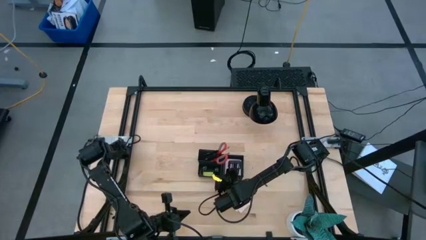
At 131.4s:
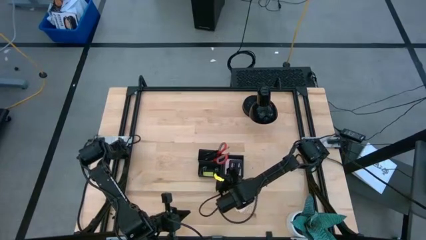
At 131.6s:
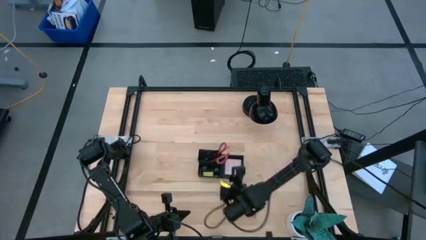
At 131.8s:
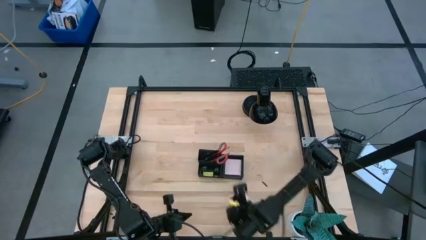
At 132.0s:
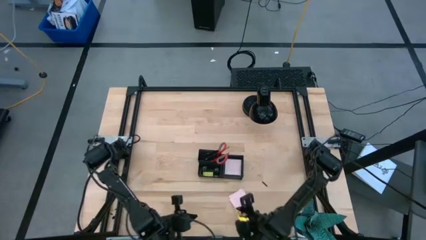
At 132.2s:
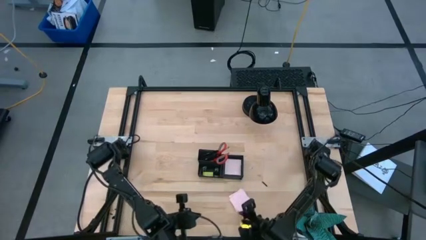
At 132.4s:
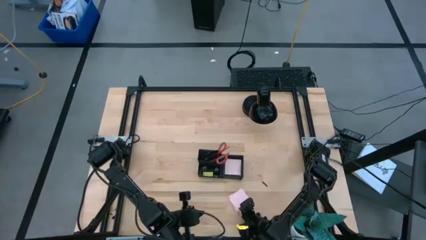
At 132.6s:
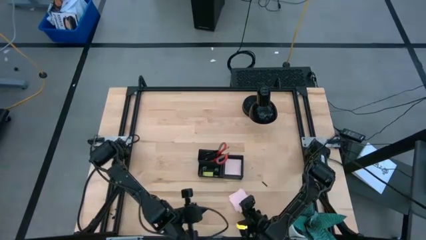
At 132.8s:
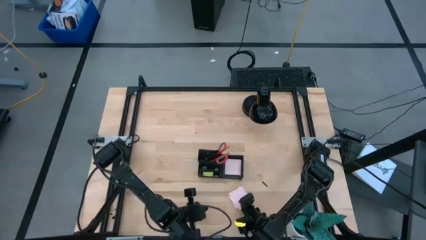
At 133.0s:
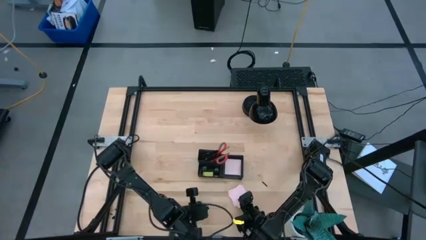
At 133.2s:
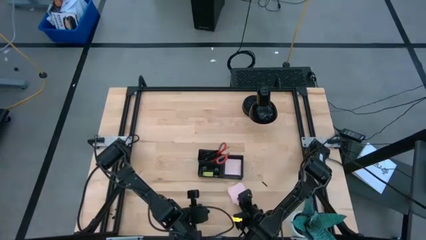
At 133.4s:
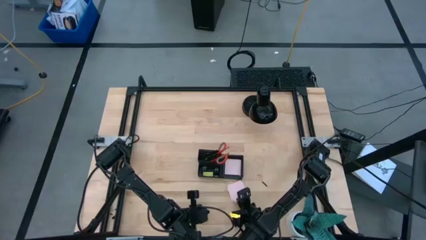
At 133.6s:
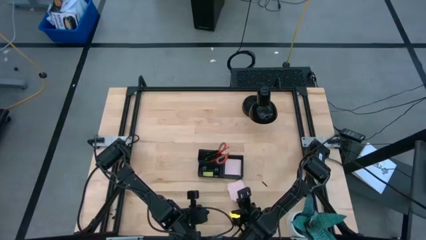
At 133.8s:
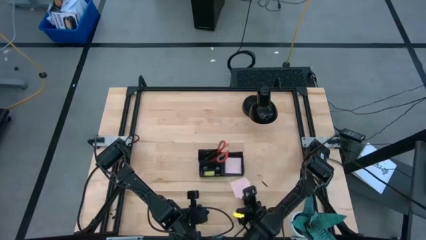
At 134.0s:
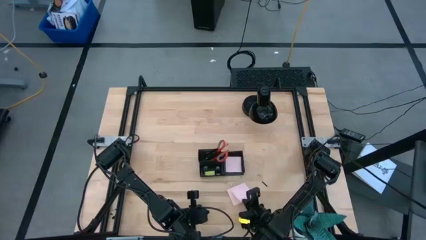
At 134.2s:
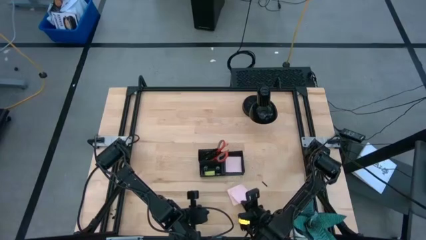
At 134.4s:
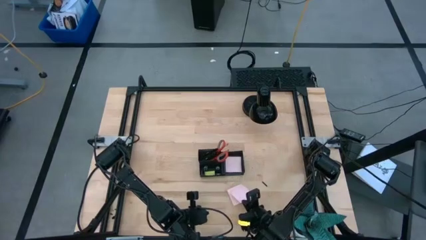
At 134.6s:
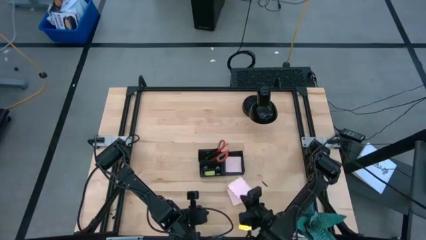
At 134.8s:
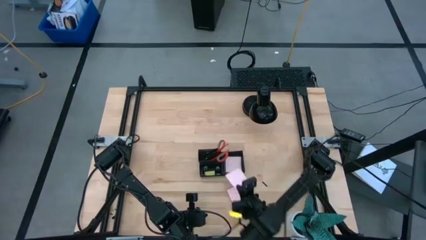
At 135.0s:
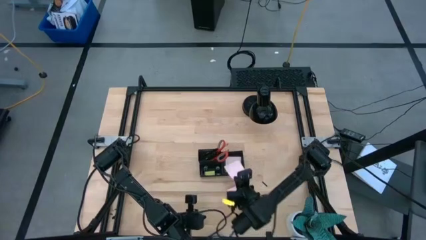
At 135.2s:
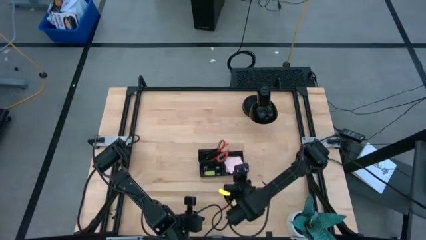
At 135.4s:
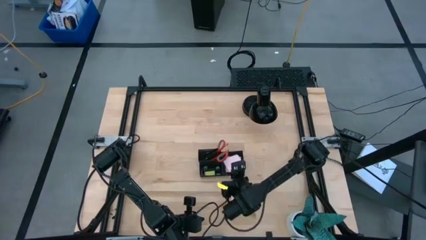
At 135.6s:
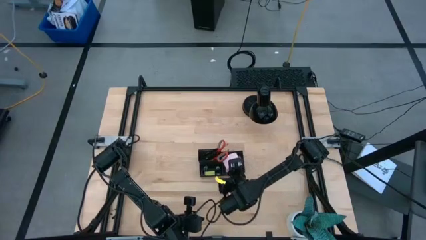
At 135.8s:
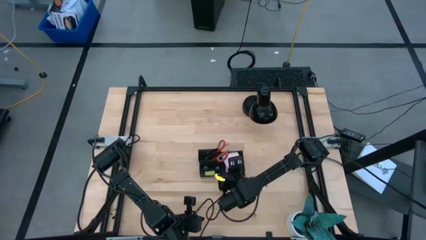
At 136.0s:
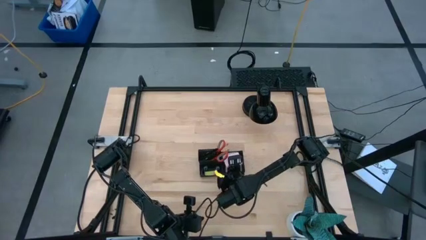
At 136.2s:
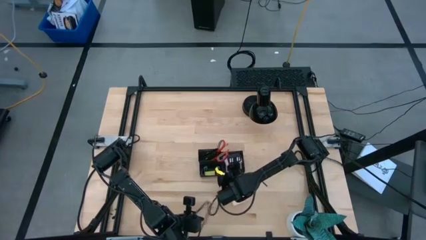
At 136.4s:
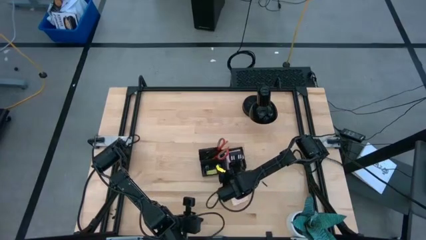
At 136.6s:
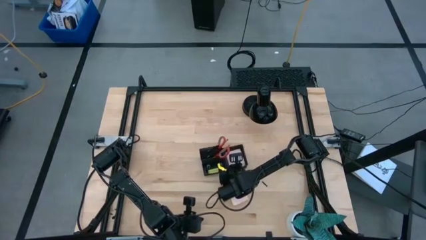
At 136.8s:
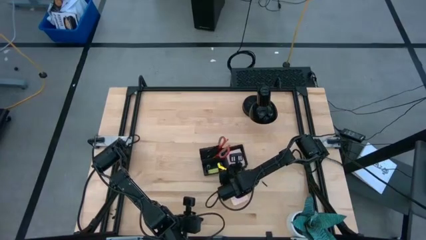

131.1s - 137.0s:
Task: Pick and place office supplies into organizer
Put the top pink sticky notes into the black desk organizer

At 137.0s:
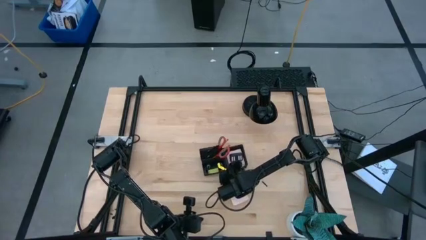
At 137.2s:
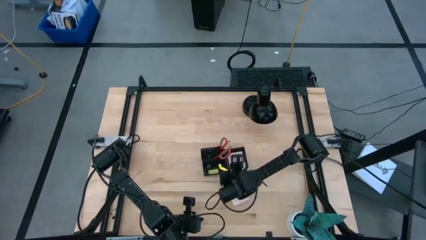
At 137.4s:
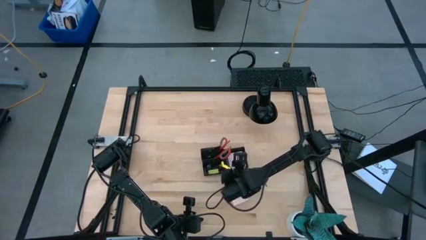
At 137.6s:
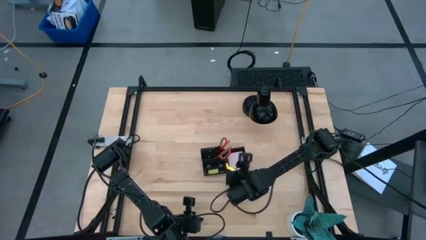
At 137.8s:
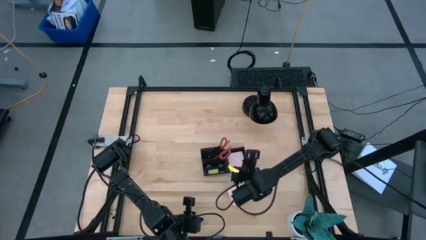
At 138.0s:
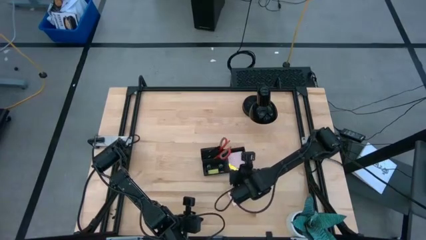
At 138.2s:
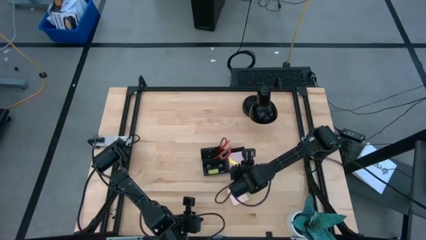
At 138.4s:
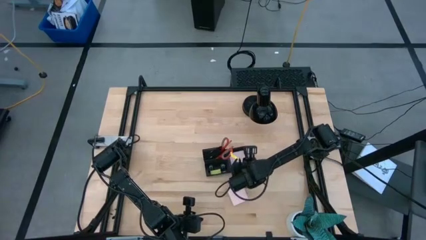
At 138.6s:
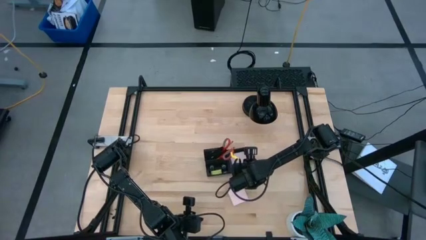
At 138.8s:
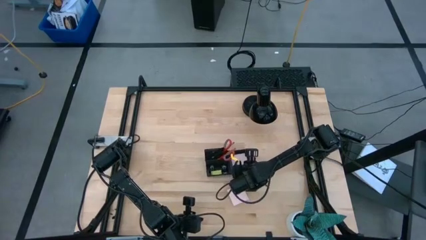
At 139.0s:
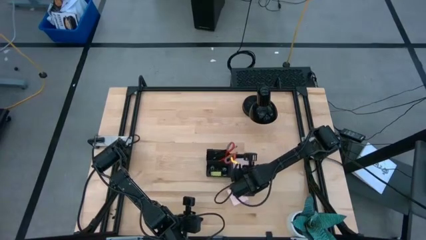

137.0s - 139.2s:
Adjust the black desk organizer on the table

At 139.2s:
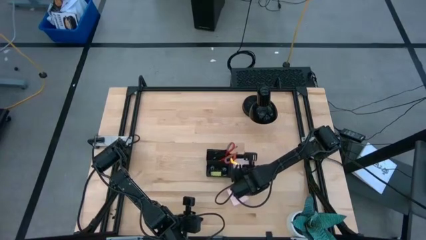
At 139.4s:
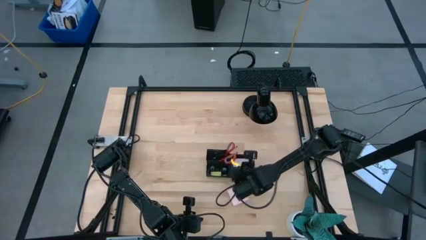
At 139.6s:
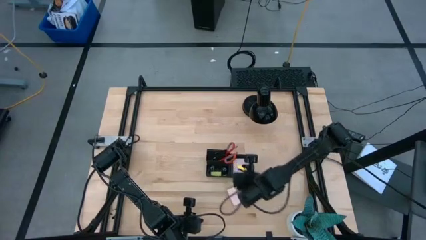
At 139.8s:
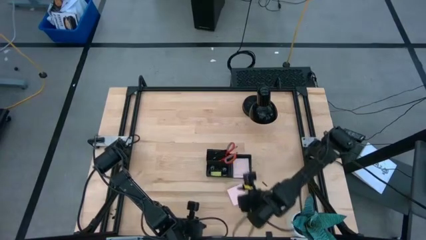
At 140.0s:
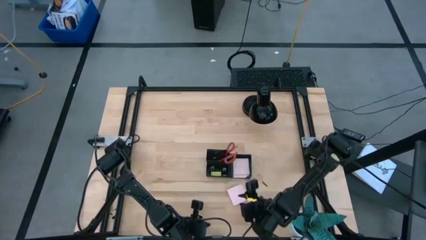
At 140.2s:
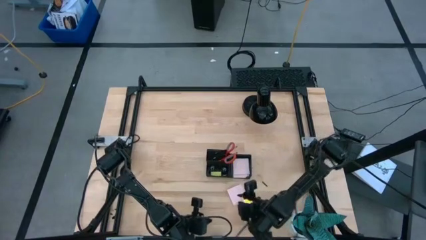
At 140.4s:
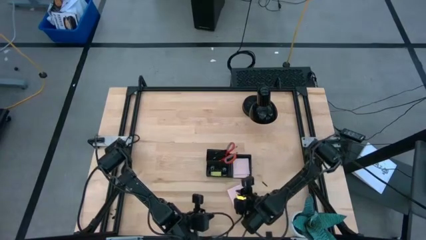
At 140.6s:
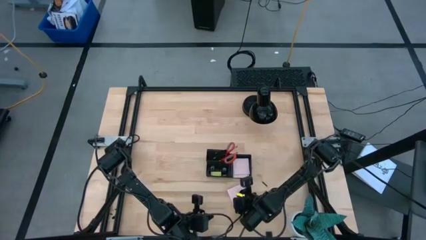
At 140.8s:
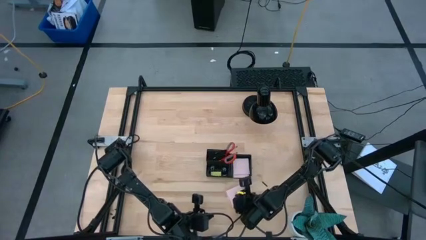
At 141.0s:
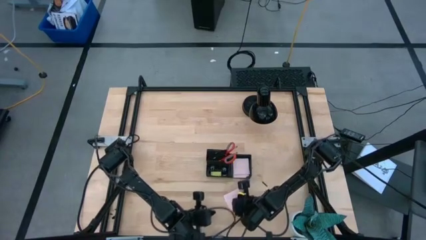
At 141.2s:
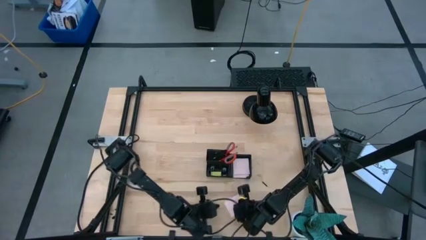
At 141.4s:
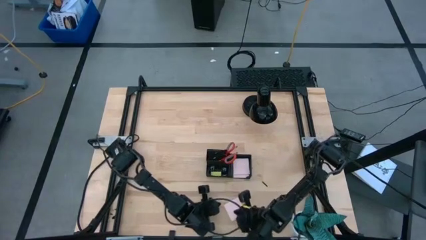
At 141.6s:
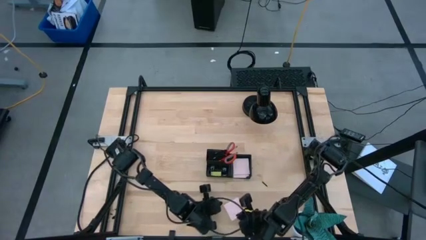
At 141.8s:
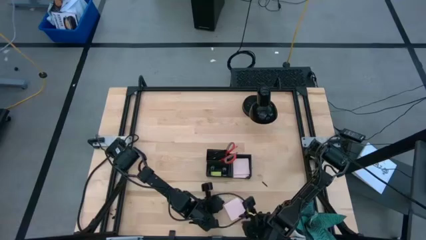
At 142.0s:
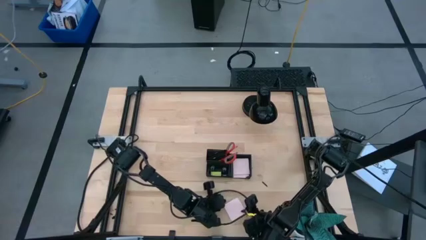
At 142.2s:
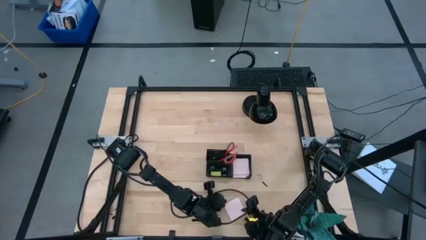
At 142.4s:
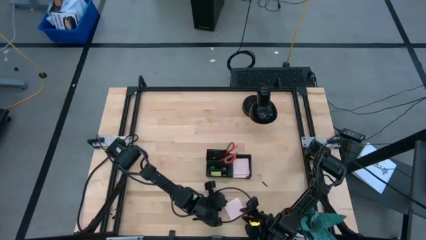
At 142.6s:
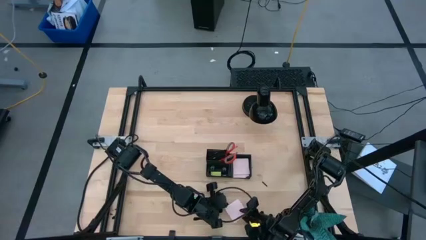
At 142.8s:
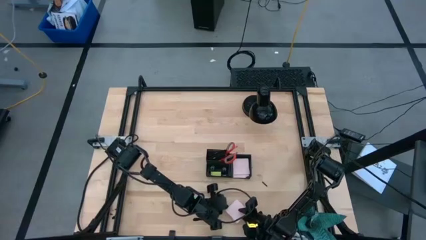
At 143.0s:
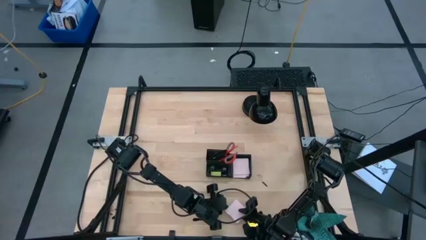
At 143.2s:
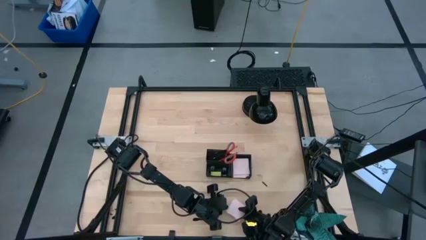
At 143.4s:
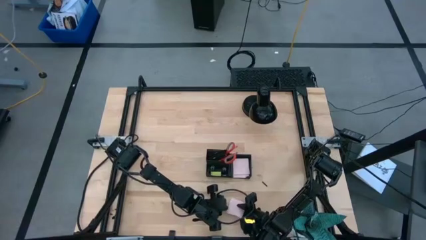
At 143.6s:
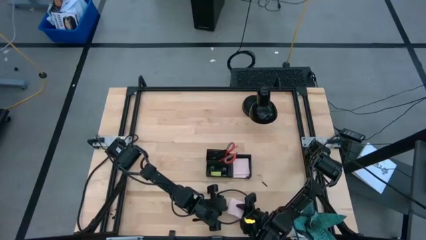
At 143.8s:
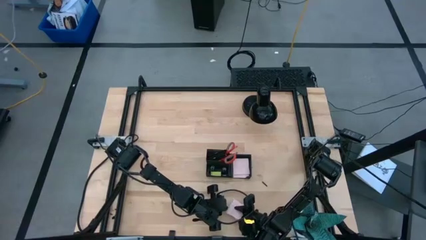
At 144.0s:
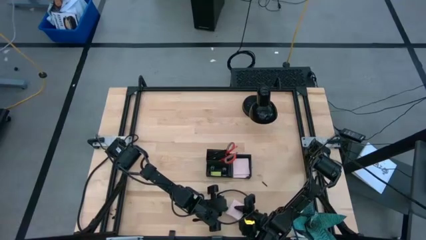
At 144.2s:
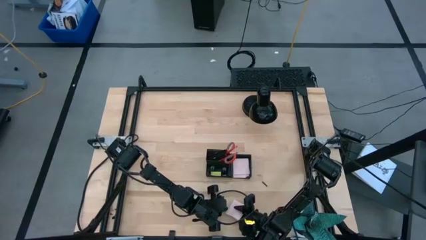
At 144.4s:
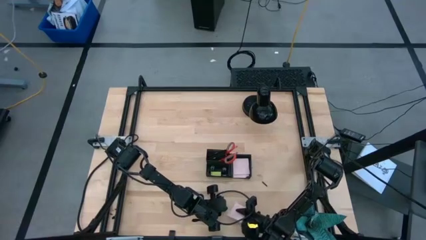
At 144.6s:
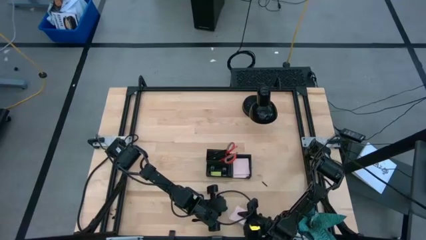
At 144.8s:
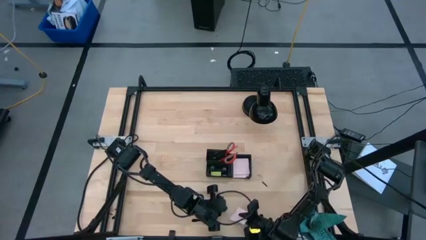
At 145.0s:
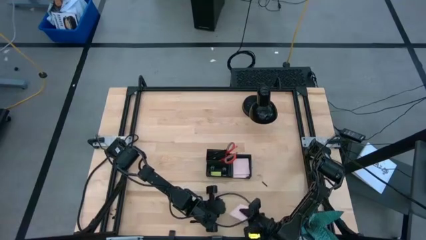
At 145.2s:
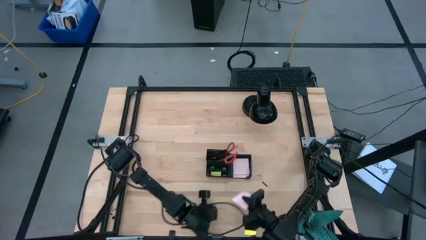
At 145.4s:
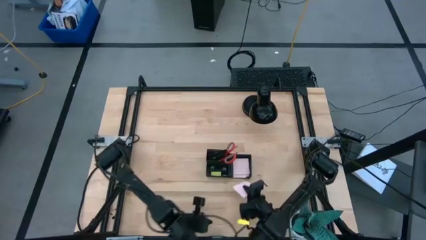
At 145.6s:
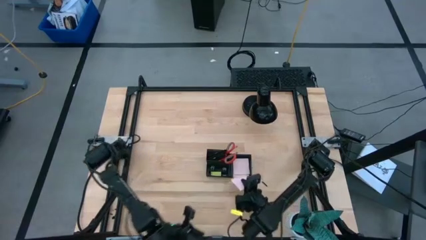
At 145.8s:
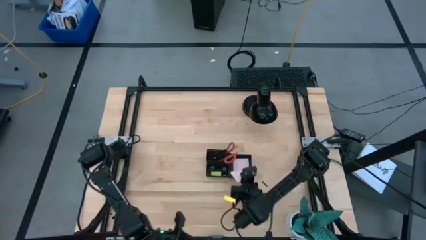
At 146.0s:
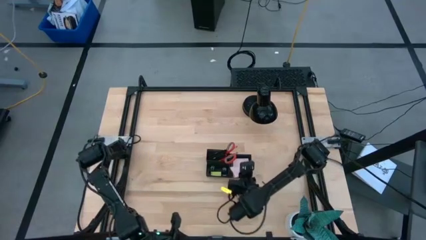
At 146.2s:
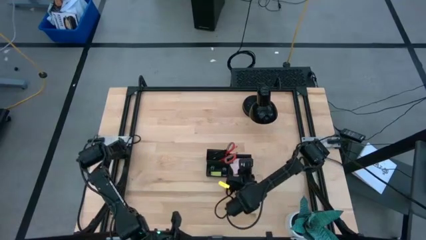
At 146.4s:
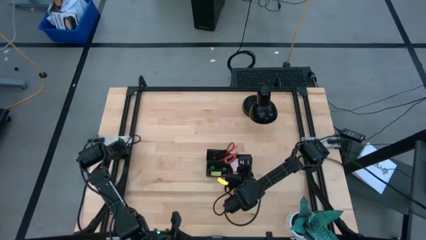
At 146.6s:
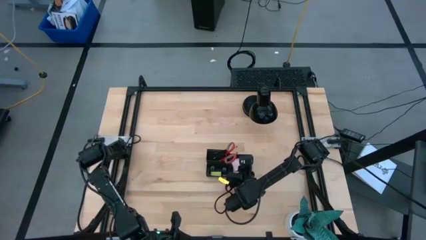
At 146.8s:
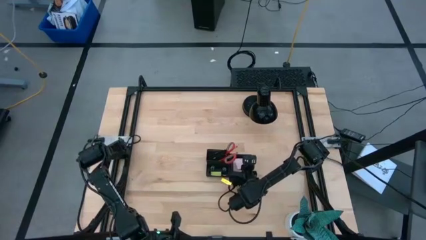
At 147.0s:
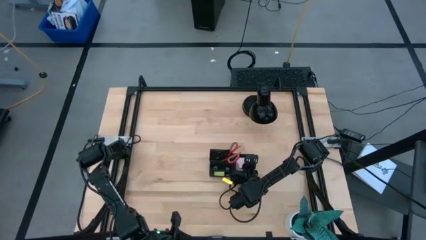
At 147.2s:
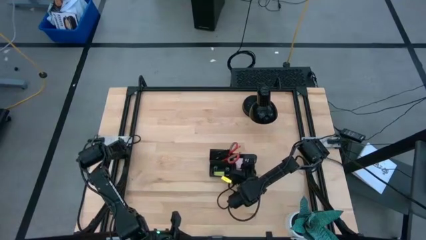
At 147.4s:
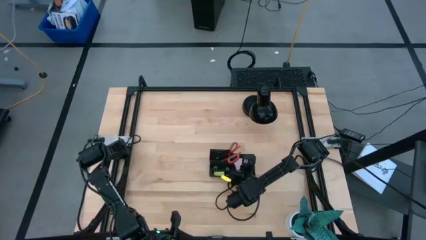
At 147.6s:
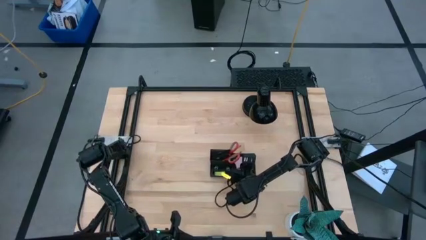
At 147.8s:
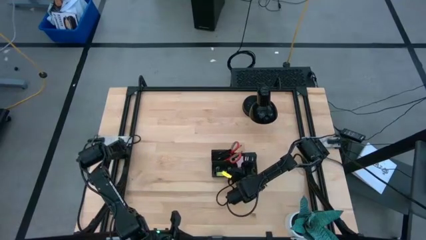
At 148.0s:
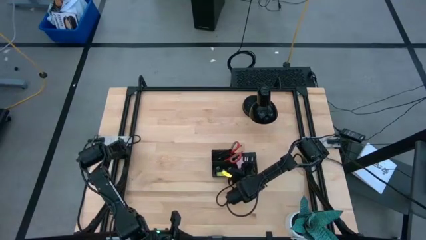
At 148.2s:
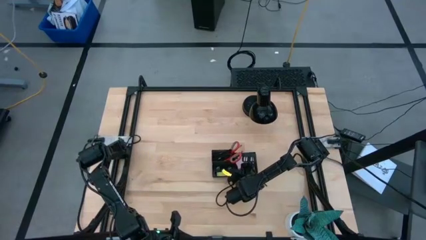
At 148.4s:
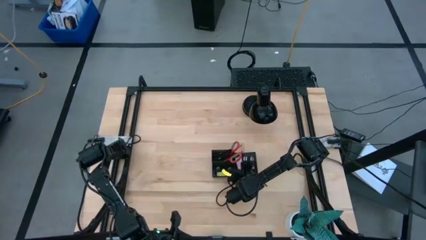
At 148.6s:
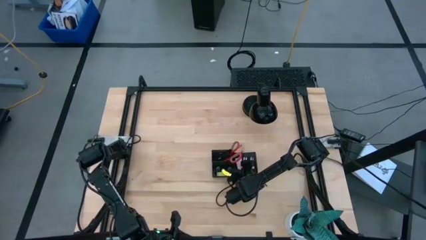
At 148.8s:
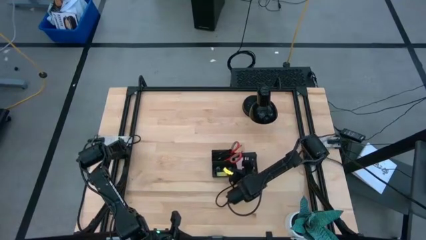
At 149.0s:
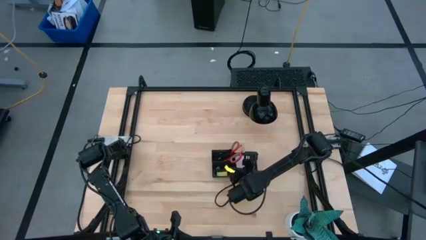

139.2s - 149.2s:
Put the pink sticky notes into the black desk organizer
